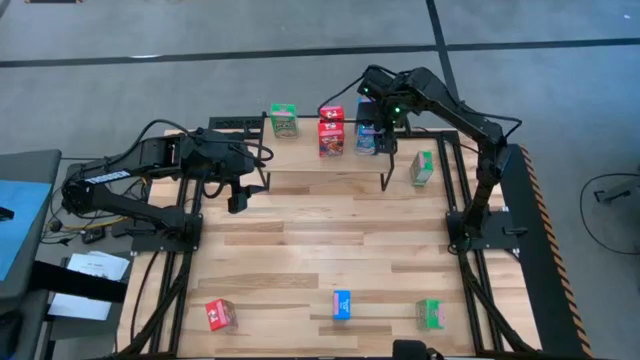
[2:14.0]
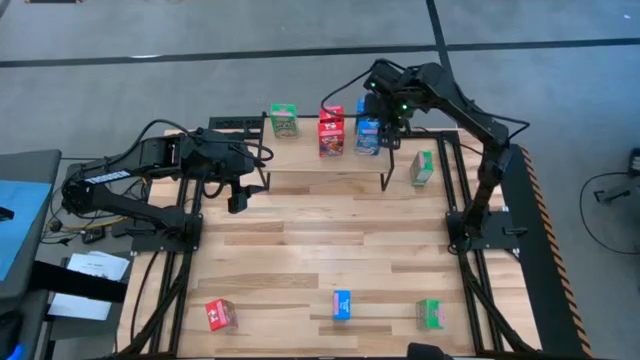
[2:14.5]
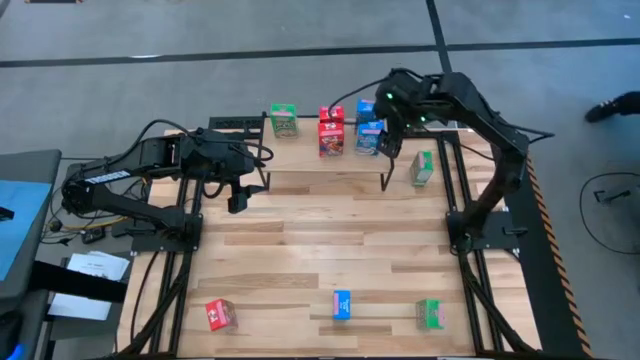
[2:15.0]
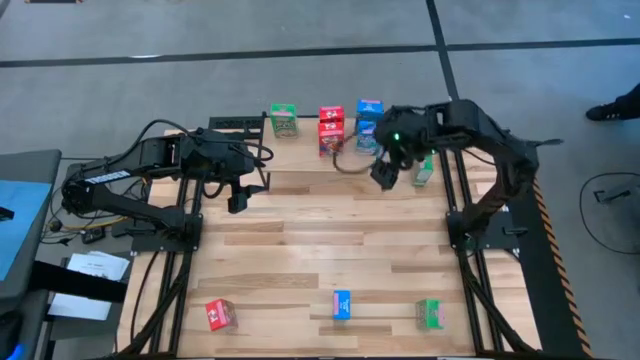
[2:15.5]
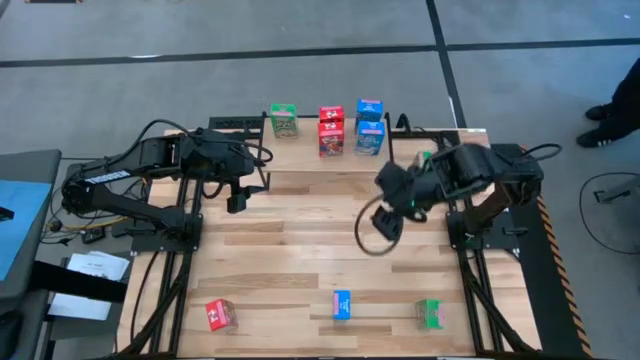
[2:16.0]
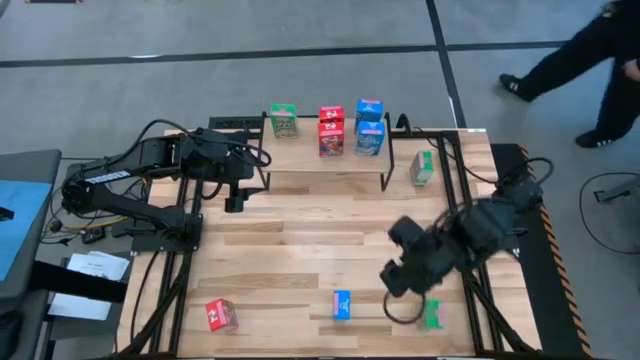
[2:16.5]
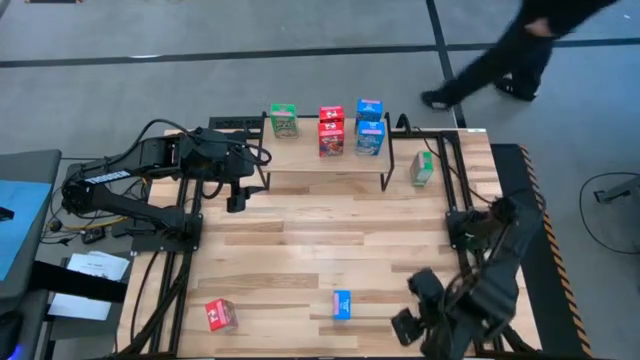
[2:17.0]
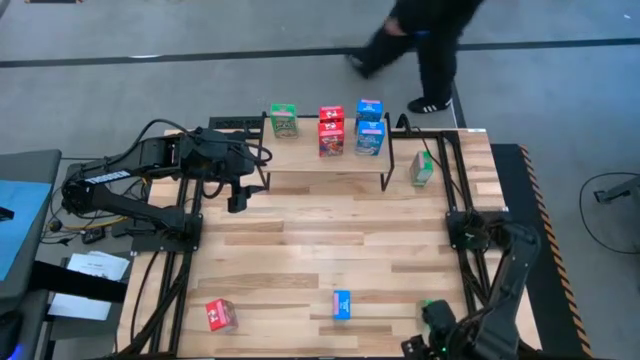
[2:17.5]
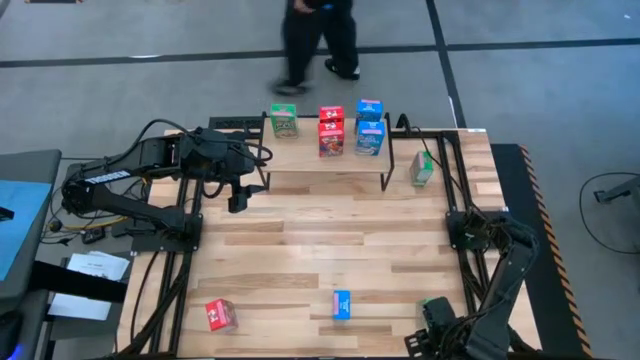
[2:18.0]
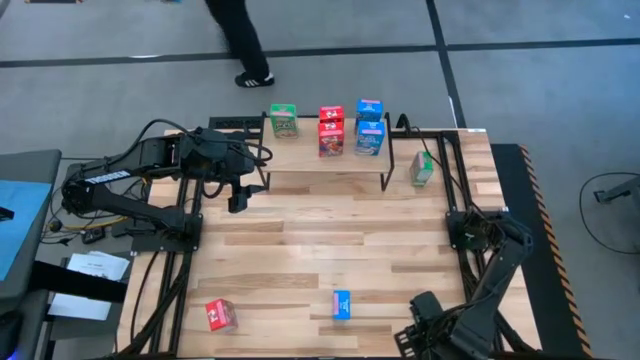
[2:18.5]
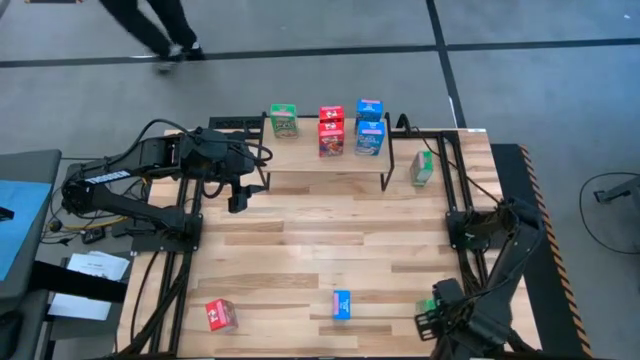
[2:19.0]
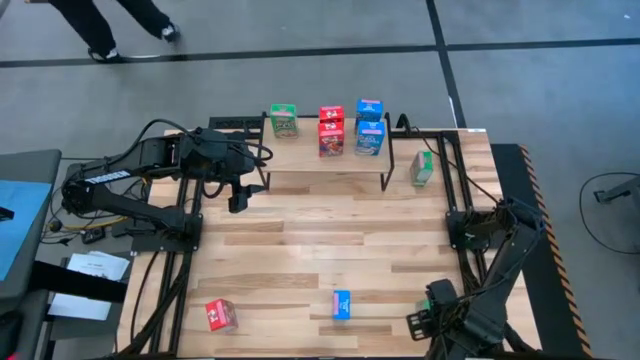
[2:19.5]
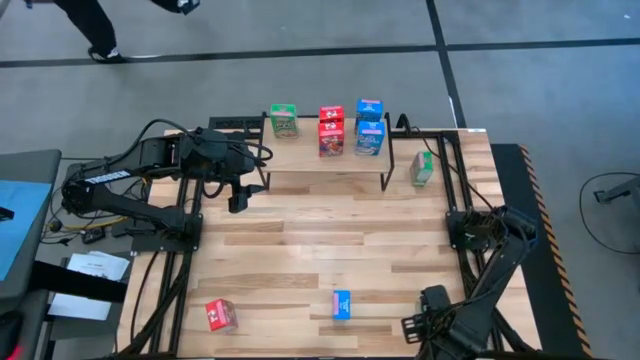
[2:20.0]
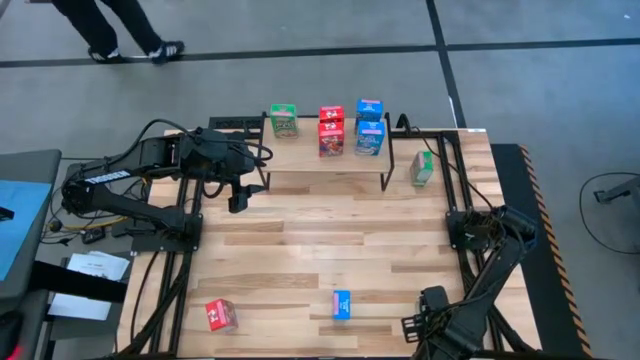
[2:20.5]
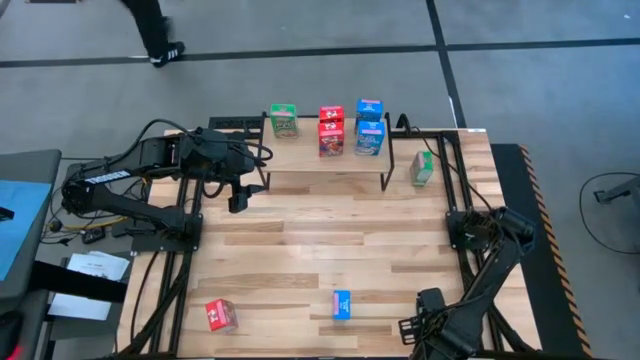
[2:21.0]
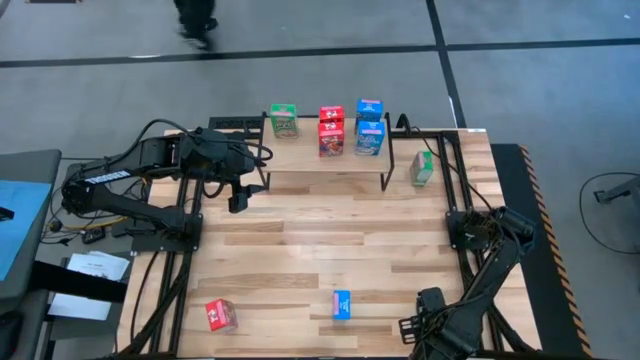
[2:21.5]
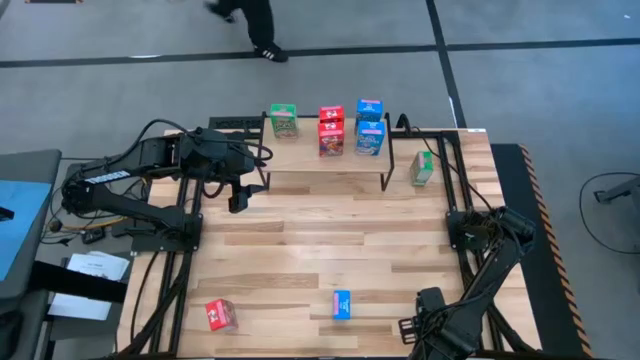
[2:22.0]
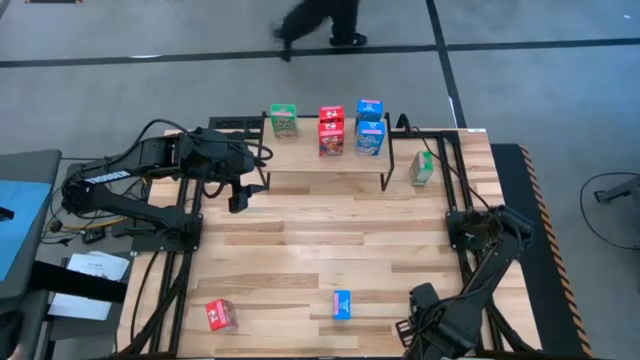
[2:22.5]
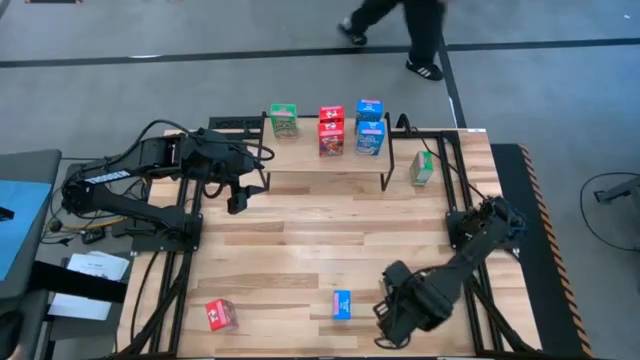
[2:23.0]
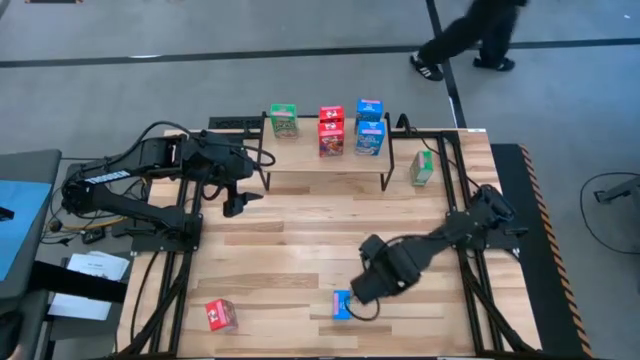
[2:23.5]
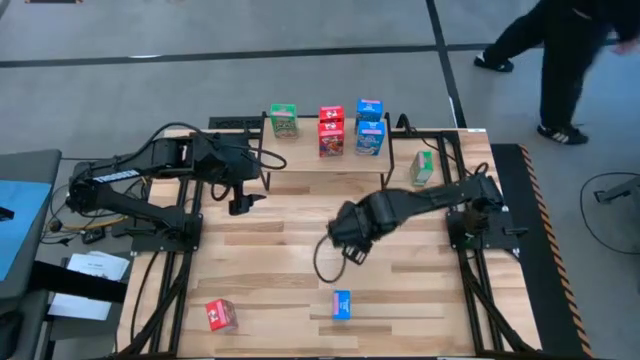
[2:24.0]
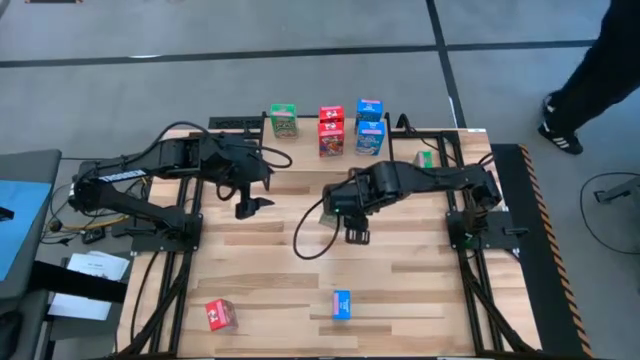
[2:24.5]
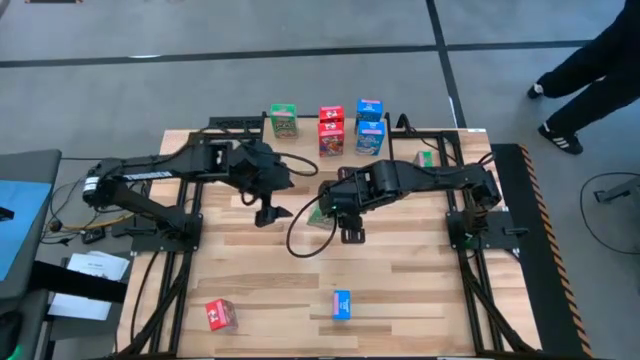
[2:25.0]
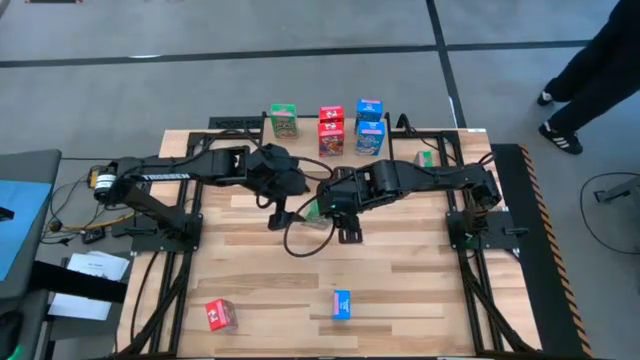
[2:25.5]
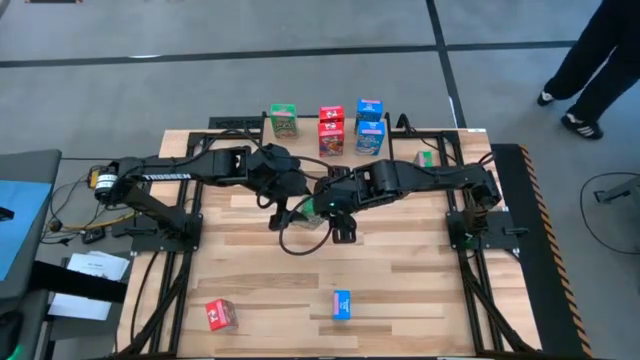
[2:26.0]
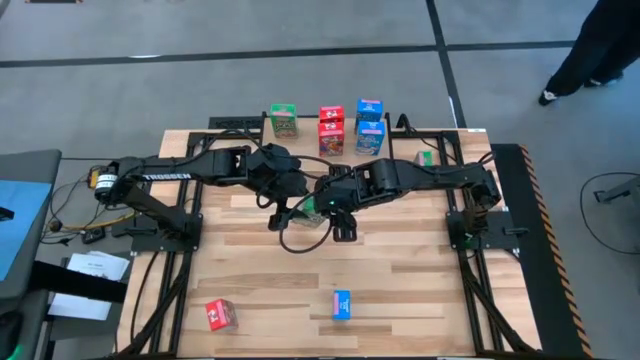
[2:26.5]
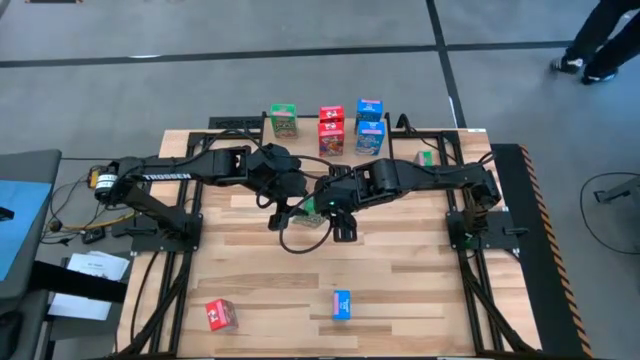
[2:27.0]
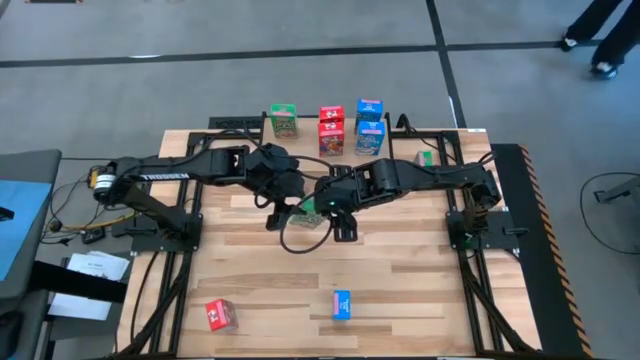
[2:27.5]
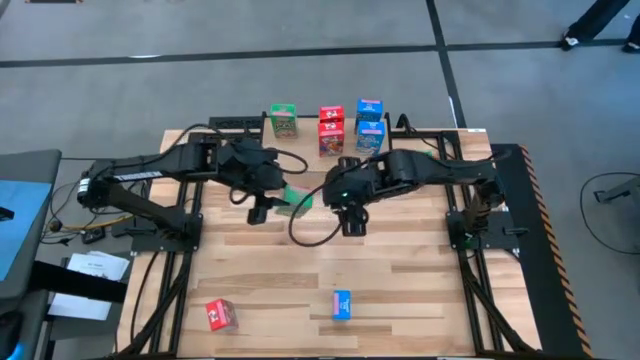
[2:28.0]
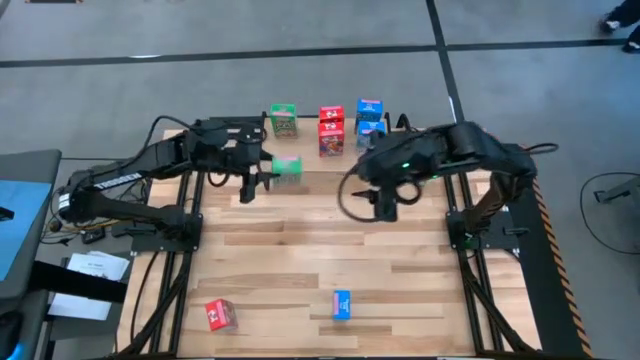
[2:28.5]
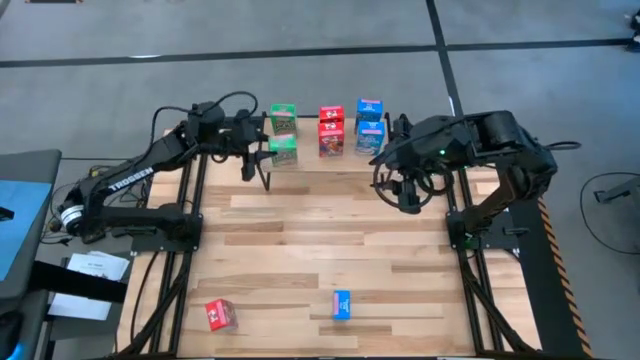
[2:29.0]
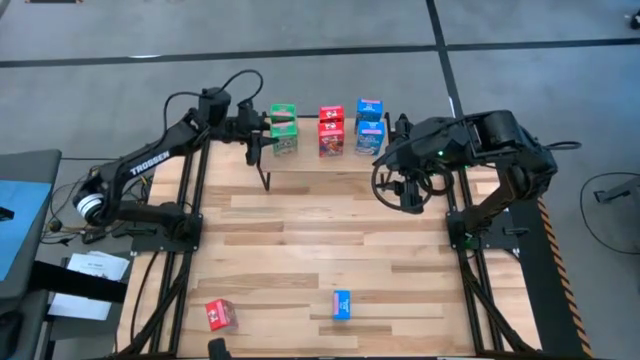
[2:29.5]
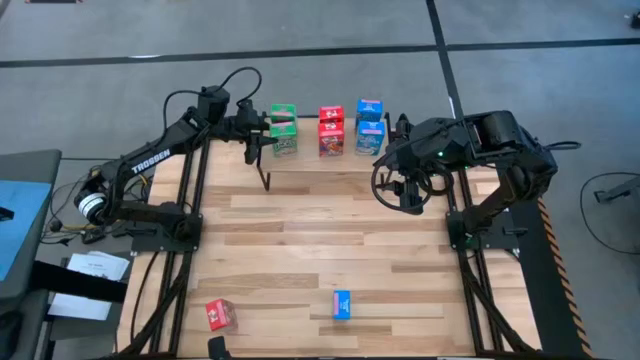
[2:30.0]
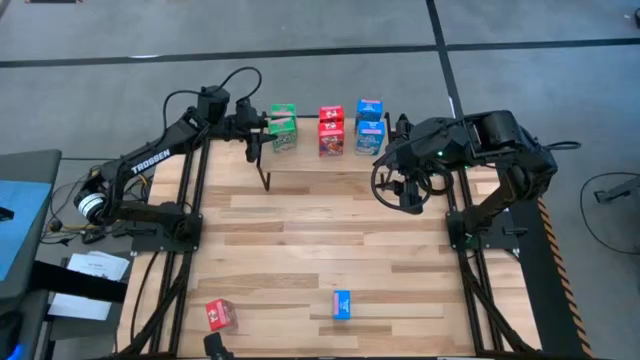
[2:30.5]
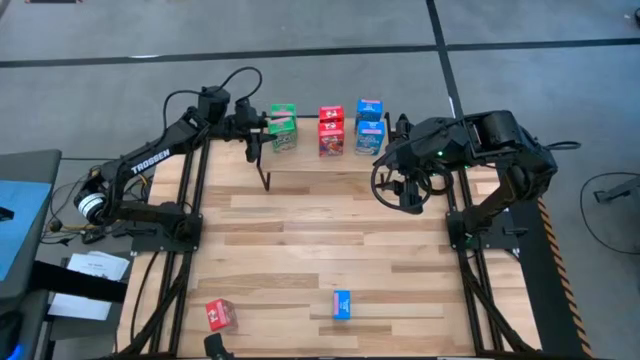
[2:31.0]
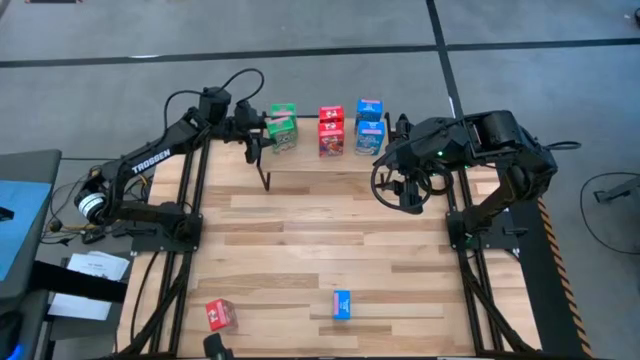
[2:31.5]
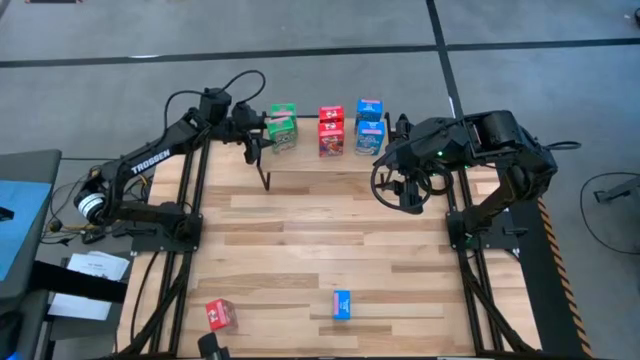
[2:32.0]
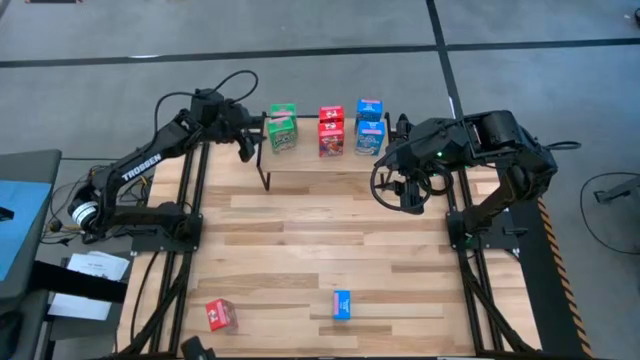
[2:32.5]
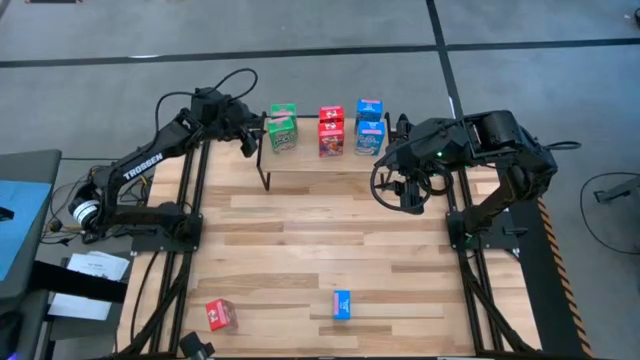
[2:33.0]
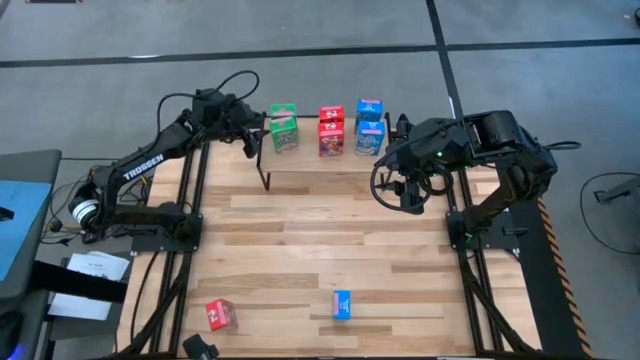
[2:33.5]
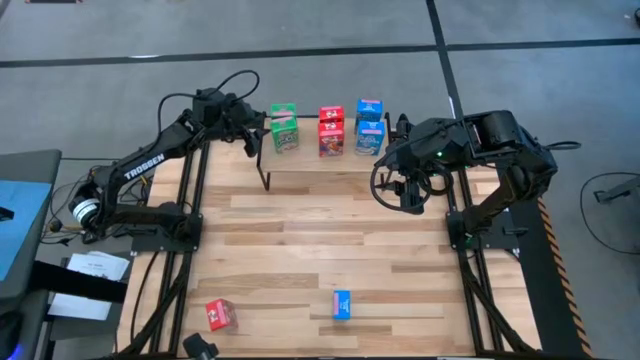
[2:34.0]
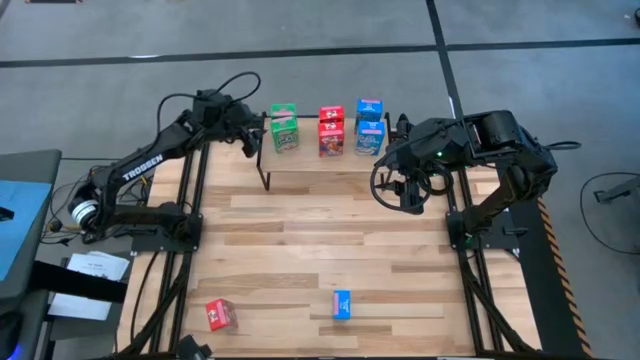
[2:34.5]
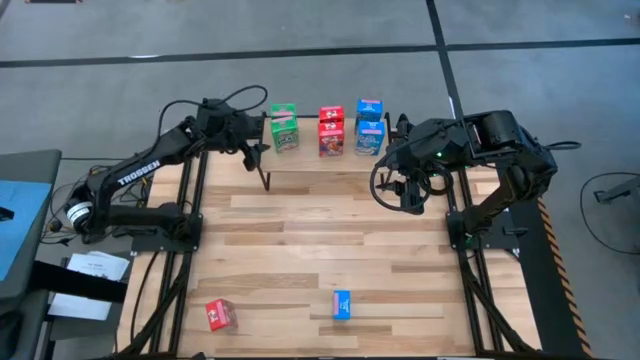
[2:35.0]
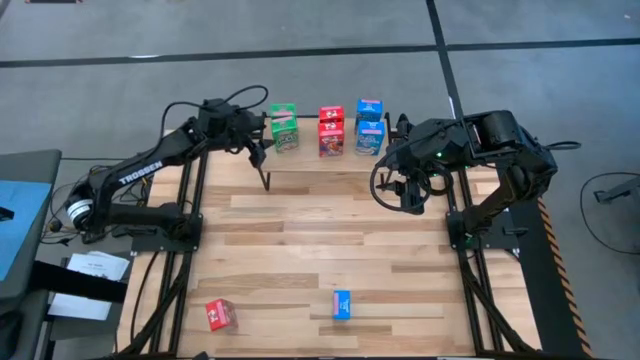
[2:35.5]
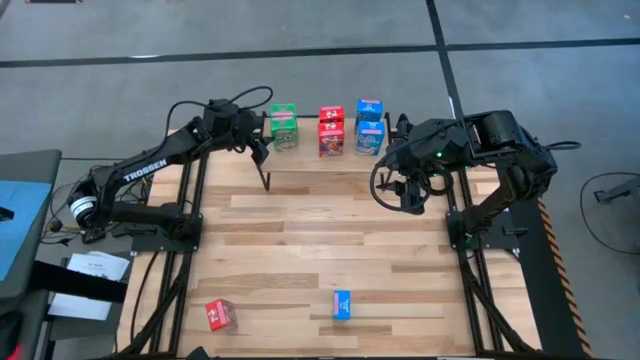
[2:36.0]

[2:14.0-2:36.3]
Task: Stack cereal on shelf
Put the bottom green cereal box on the shelf aligned with the other green cereal box
